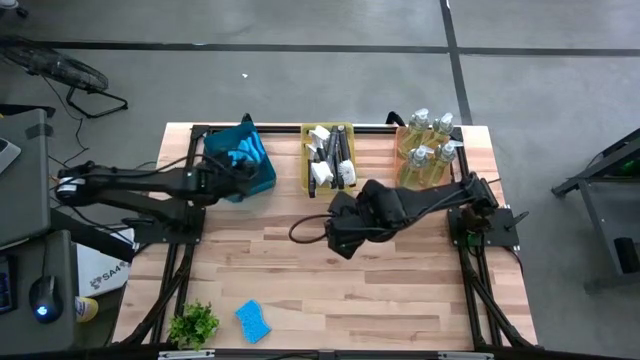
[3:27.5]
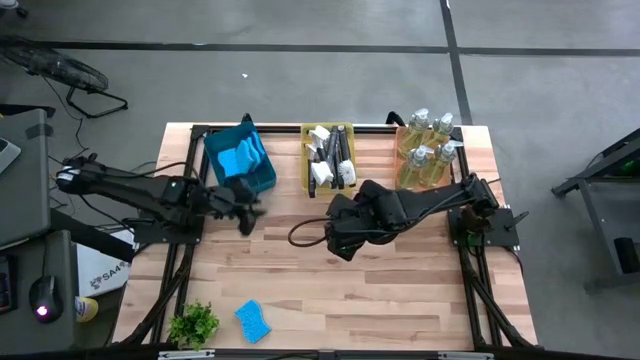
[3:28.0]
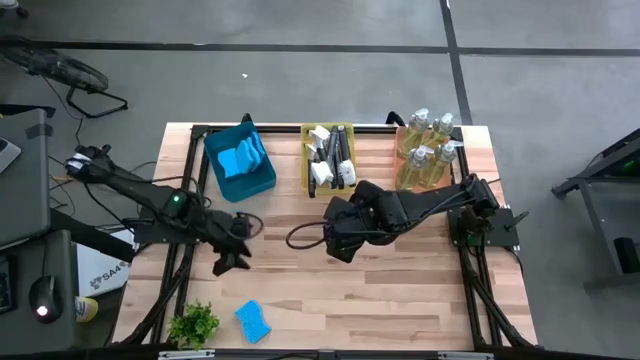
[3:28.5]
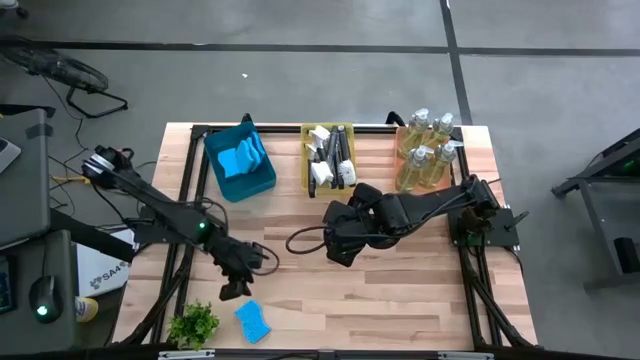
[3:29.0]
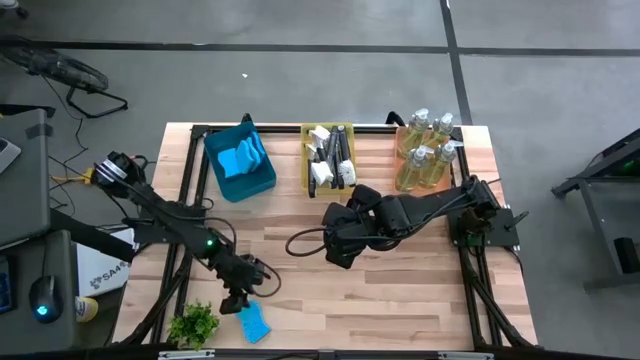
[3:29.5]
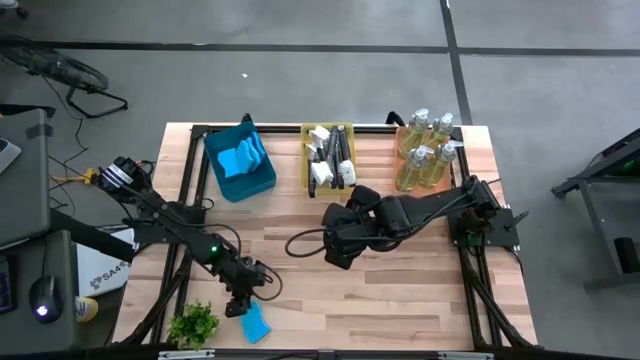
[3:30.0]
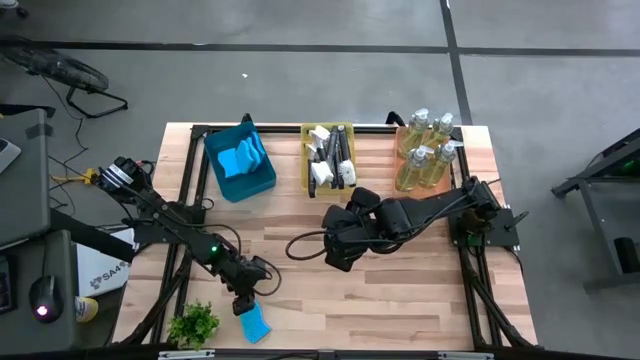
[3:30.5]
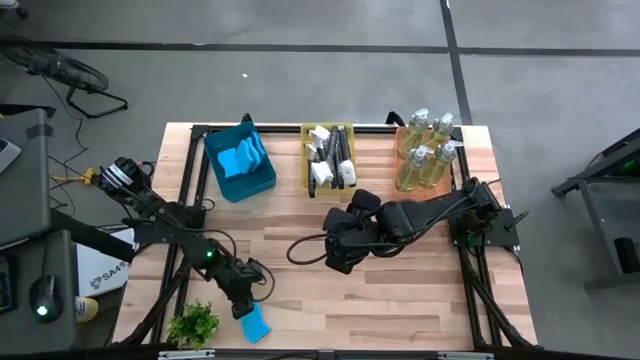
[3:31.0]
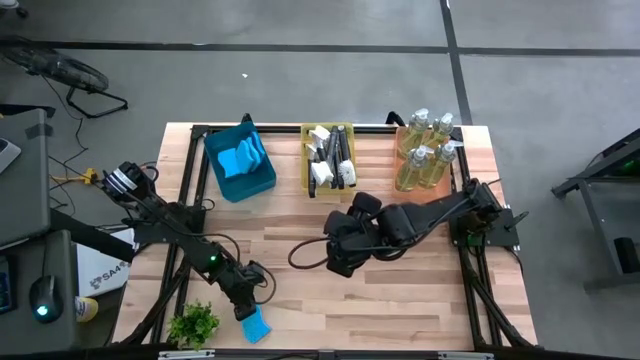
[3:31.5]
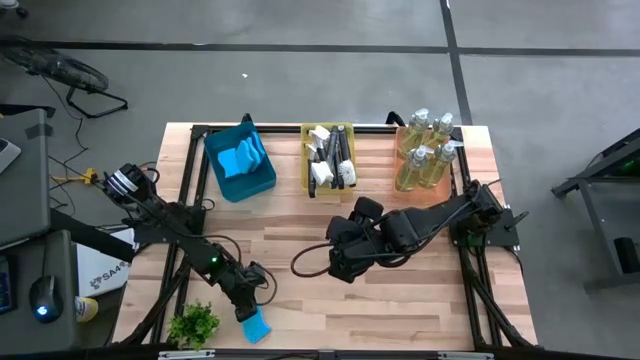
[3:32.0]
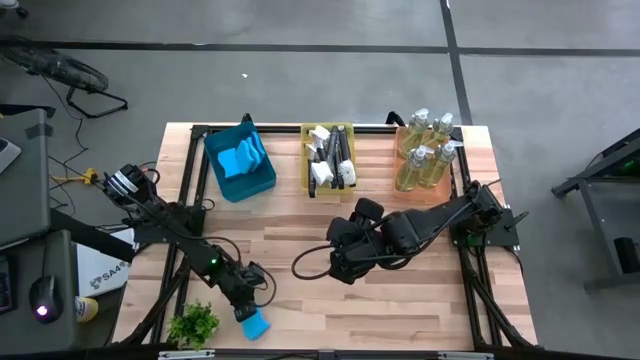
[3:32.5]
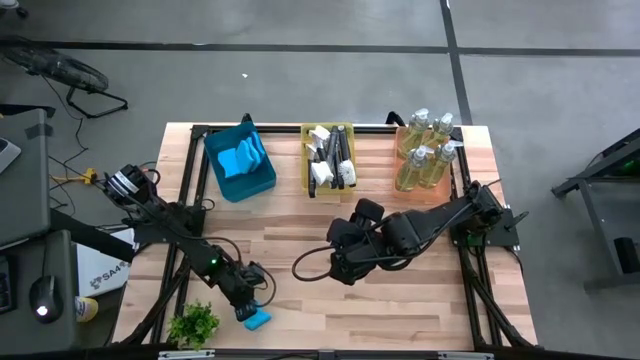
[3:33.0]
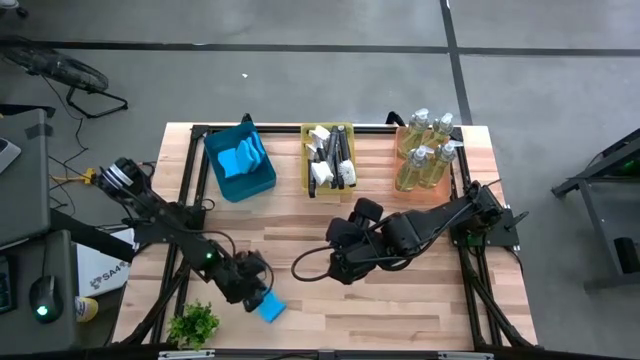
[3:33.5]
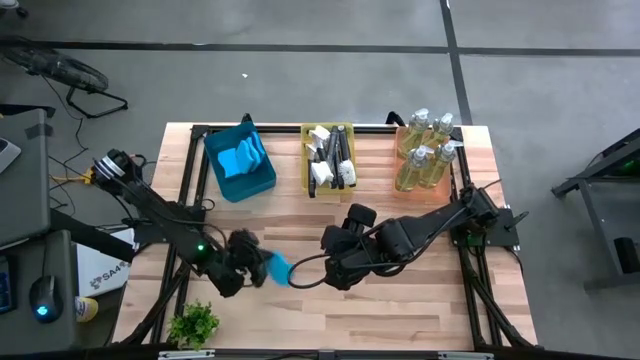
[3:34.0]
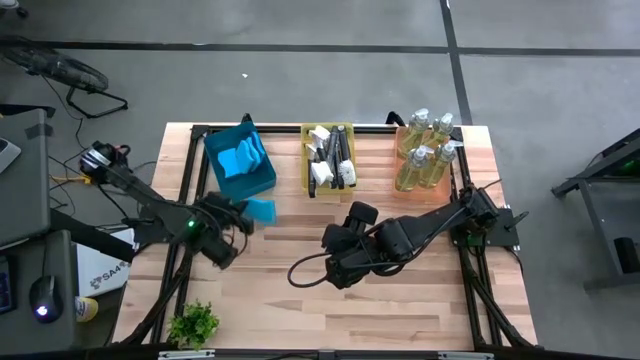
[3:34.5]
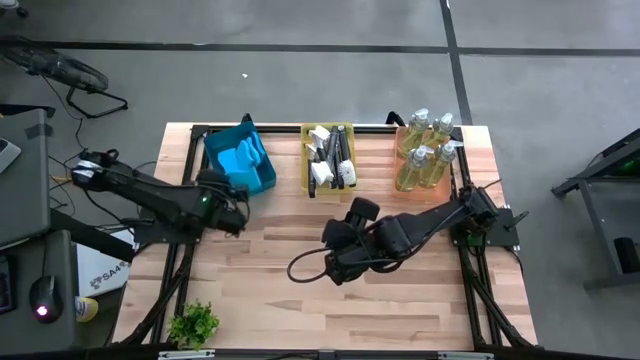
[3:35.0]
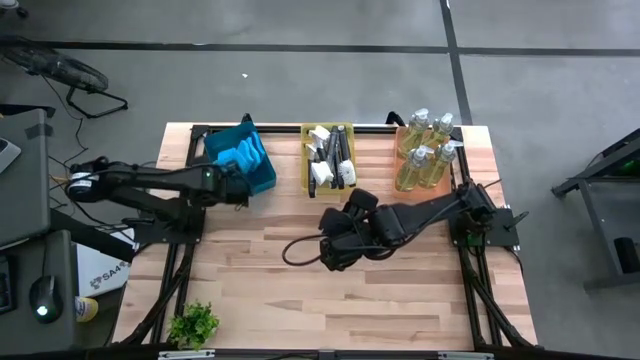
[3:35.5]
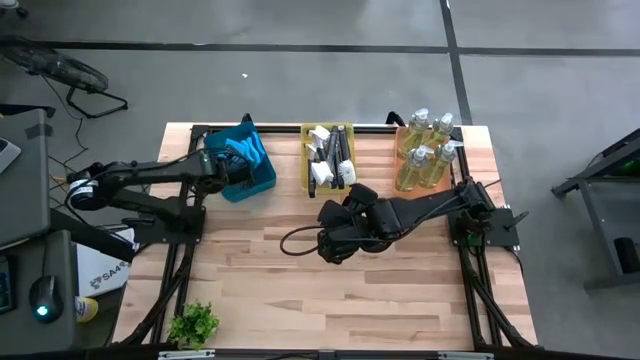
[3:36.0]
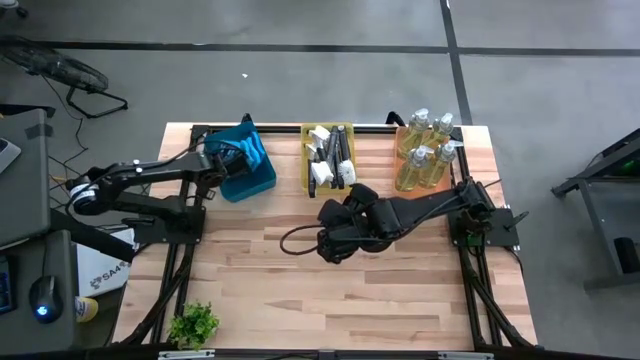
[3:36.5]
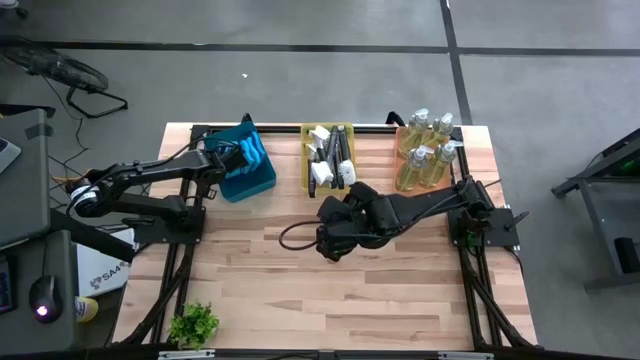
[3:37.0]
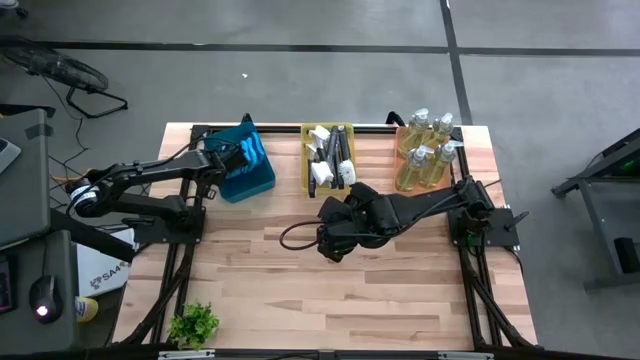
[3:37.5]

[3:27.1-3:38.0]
Task: Pick & Place Kitchen Sink Supplies
Put the blue dishwashing sponge into the blue bin

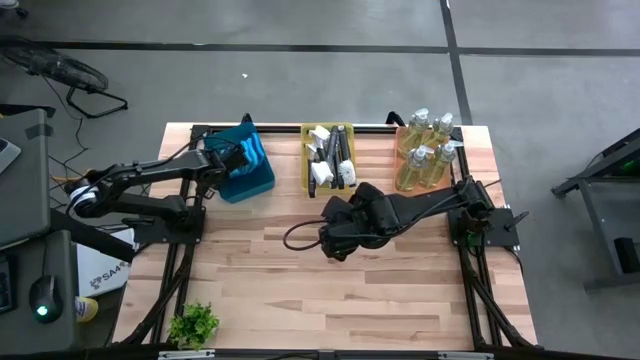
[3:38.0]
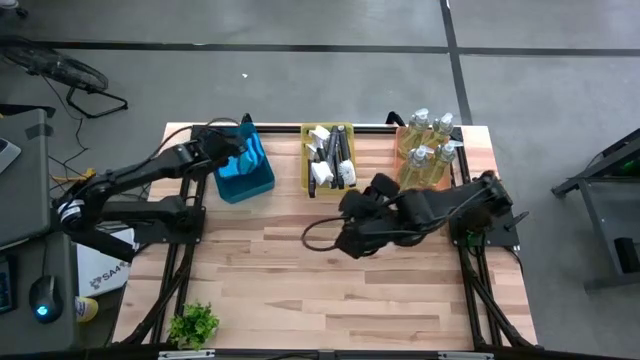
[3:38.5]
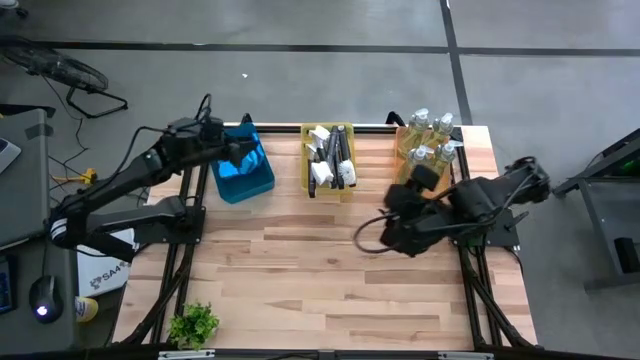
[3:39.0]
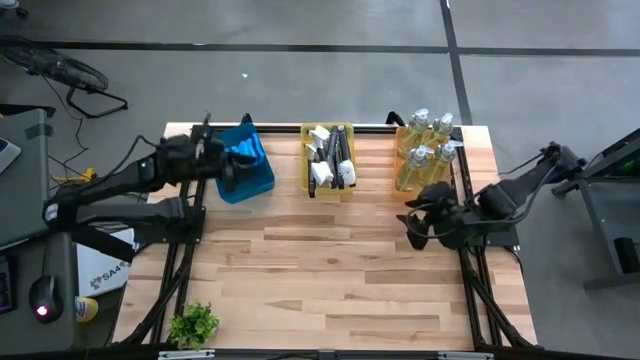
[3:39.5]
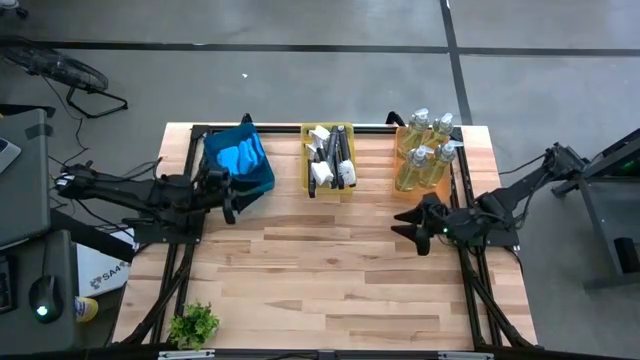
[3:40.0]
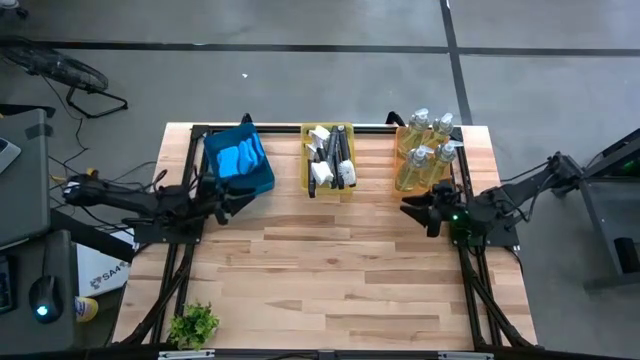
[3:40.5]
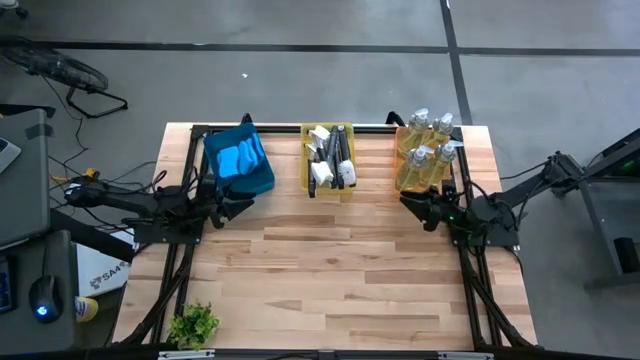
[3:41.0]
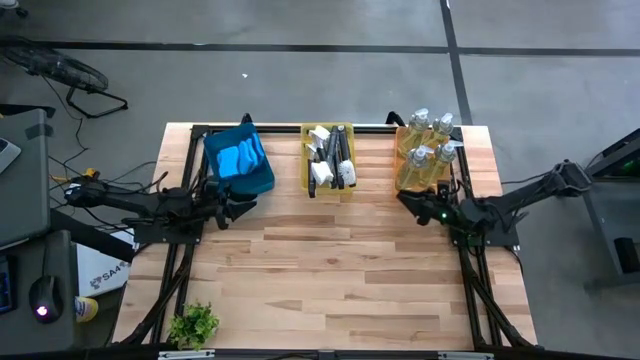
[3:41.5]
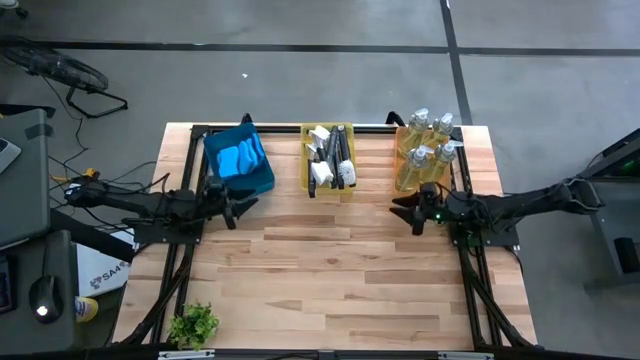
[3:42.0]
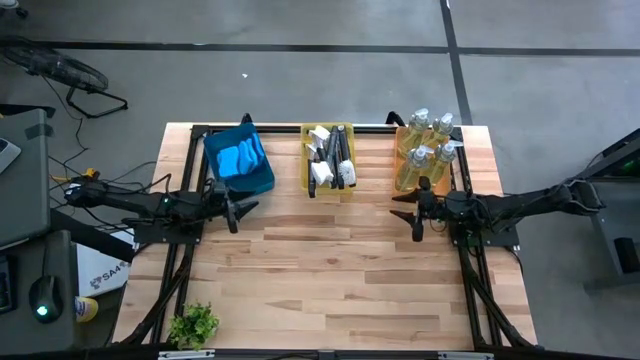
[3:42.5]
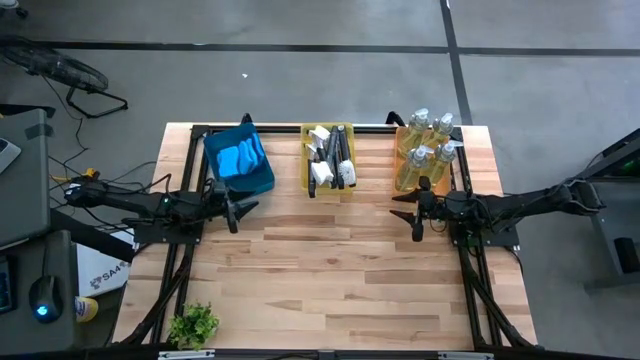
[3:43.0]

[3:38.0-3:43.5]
Return to Home Position
